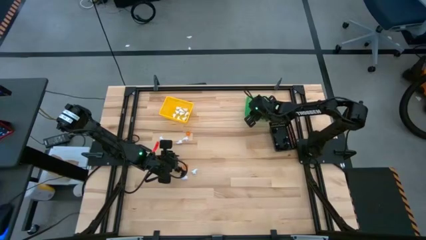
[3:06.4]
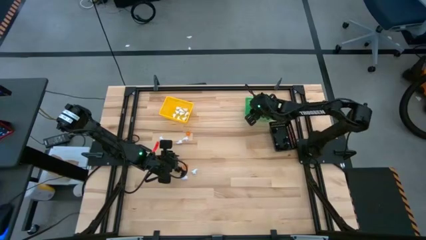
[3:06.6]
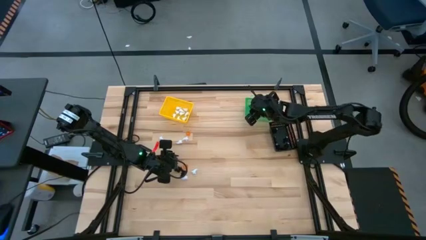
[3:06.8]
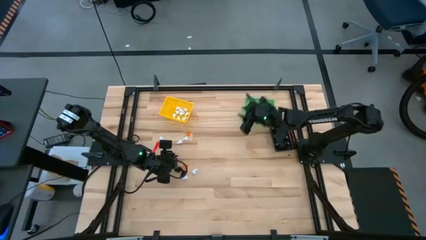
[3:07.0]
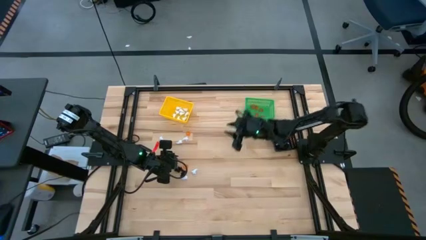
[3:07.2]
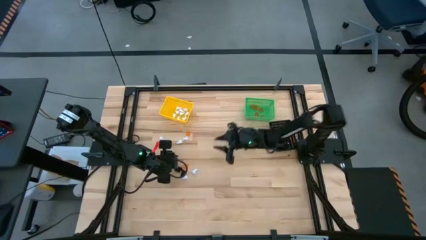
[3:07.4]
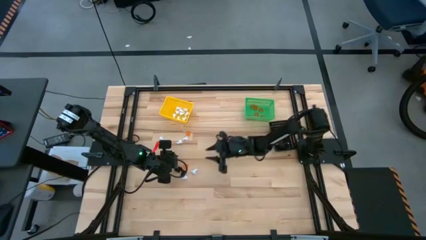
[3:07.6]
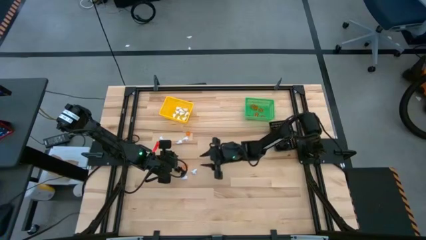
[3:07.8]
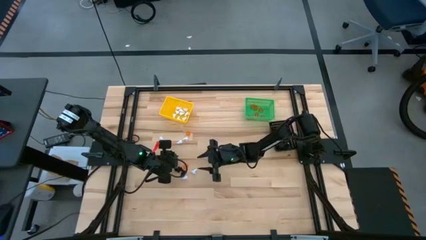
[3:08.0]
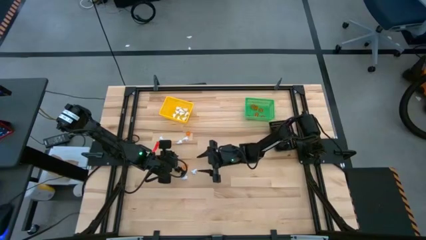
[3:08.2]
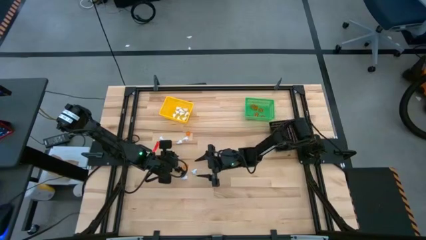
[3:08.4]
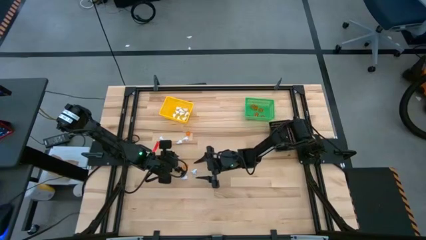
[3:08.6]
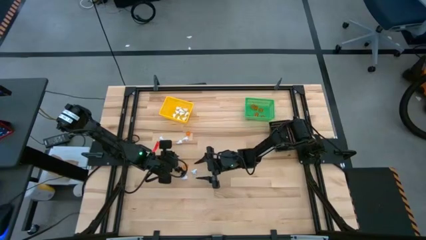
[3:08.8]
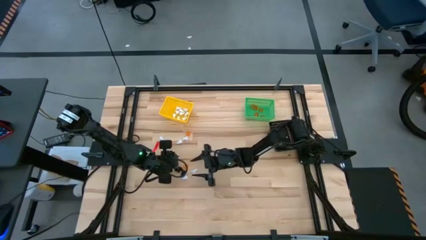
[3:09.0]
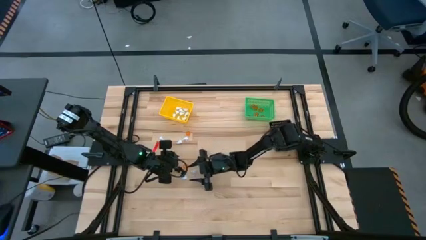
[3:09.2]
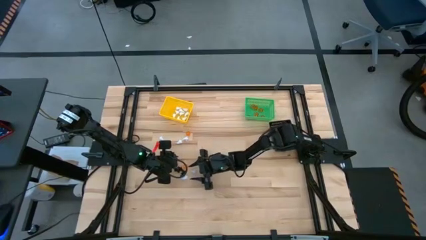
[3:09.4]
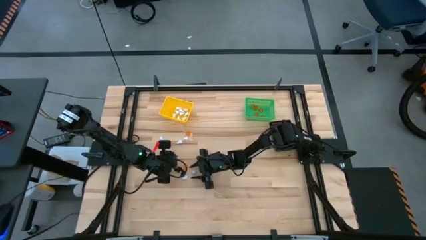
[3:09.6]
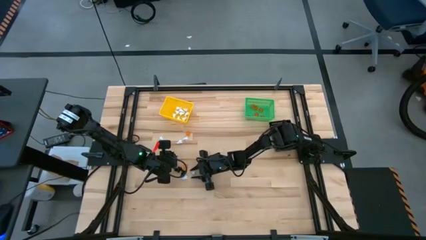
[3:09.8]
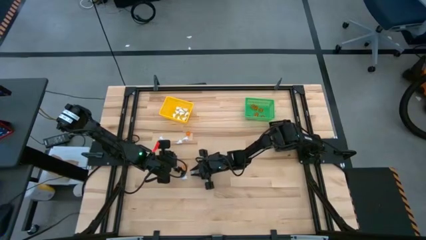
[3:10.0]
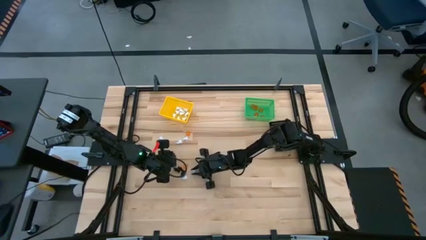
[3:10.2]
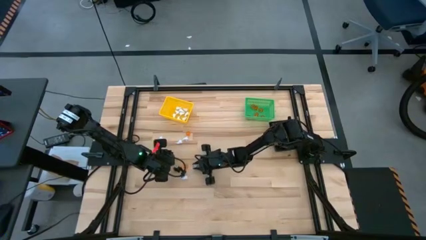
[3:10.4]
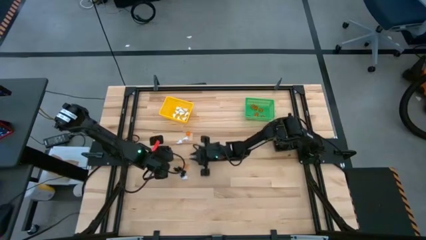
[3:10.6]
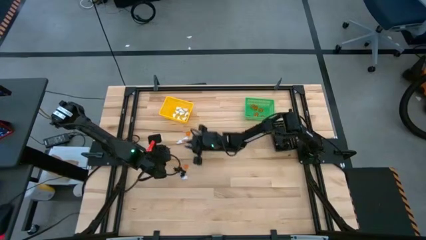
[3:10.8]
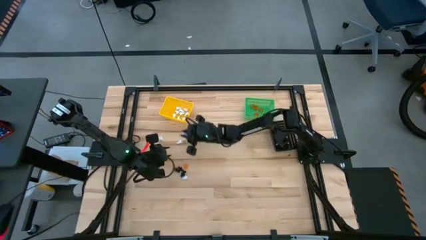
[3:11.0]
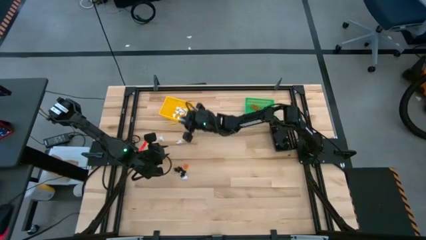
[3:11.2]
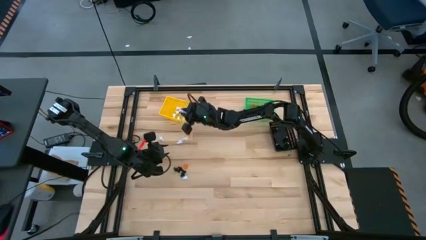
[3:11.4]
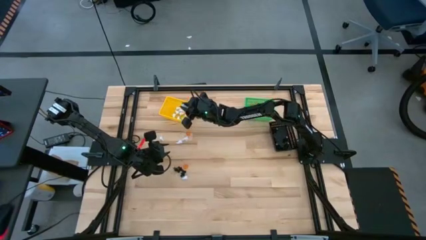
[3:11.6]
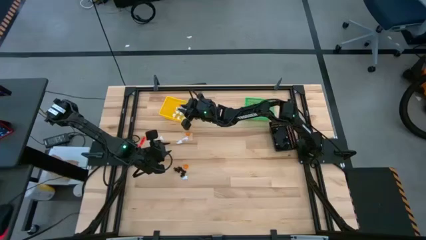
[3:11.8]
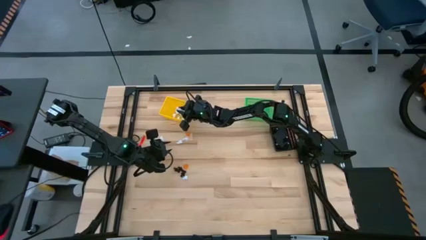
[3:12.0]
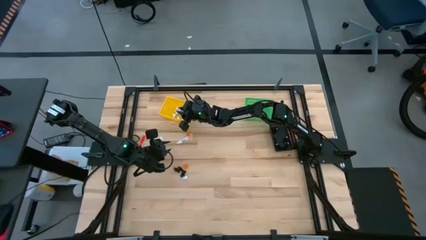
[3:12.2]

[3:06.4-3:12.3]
Task: Sort Halloween decoration
Put the white ghost toy into the yellow bin

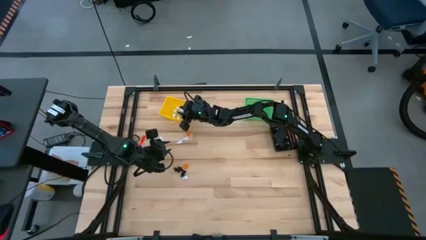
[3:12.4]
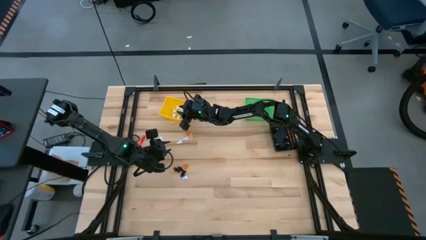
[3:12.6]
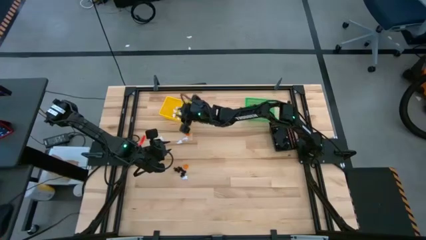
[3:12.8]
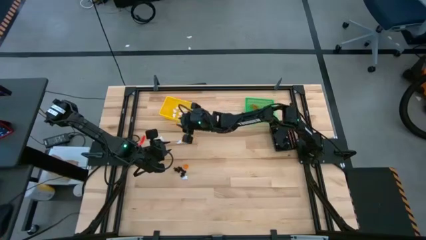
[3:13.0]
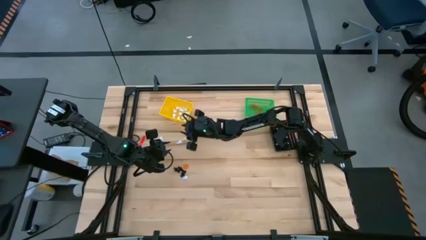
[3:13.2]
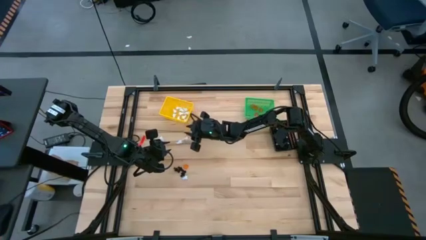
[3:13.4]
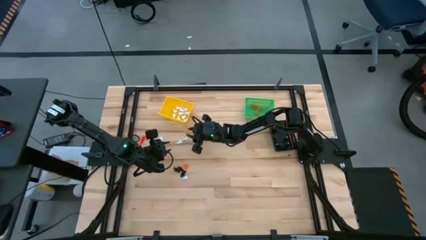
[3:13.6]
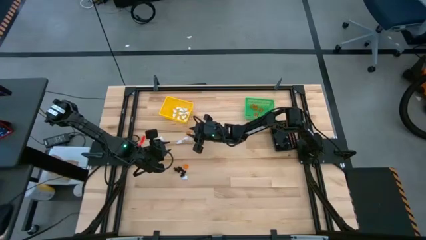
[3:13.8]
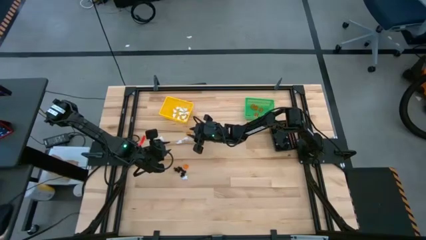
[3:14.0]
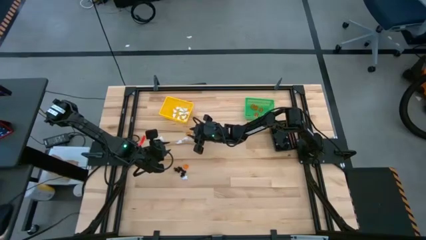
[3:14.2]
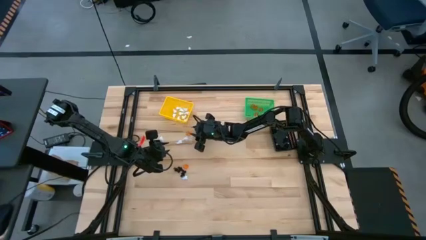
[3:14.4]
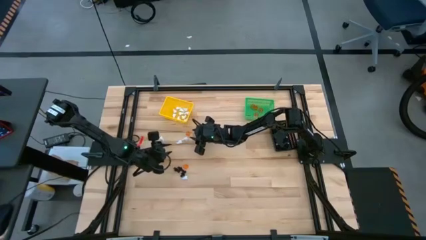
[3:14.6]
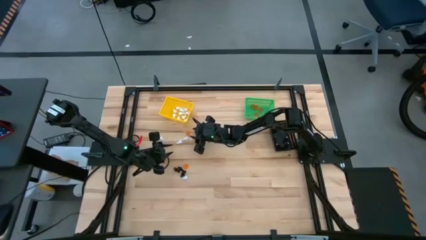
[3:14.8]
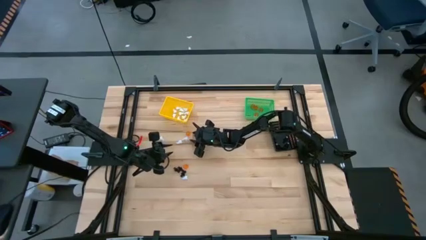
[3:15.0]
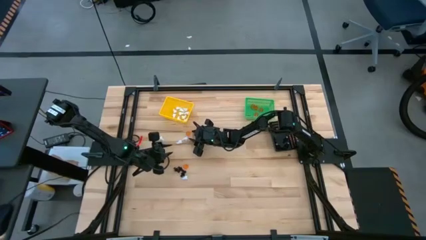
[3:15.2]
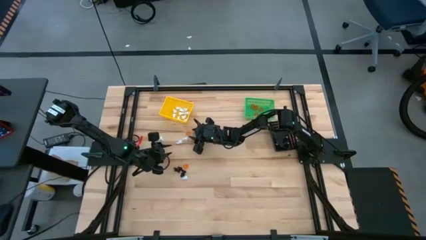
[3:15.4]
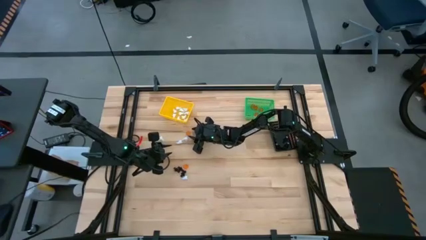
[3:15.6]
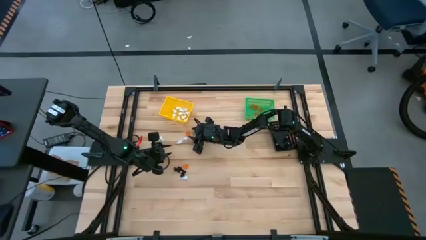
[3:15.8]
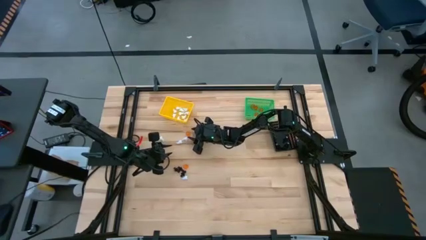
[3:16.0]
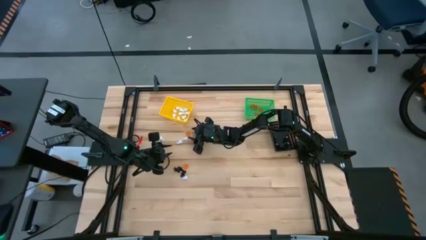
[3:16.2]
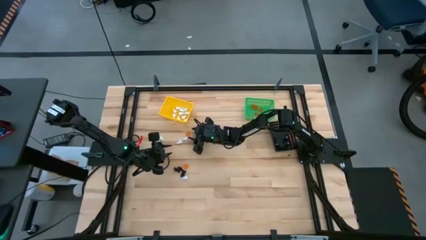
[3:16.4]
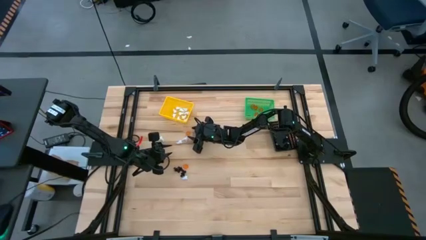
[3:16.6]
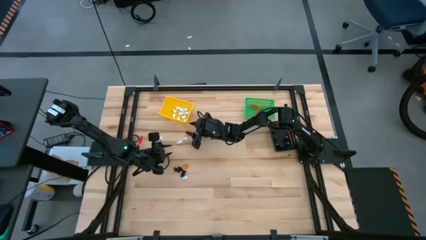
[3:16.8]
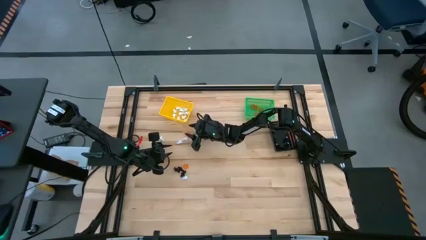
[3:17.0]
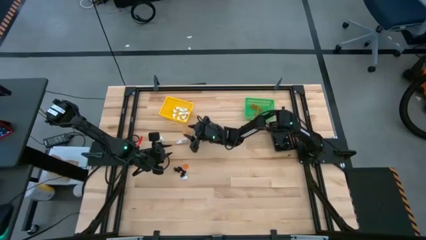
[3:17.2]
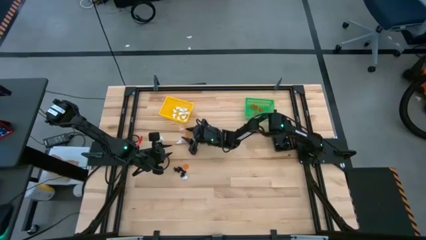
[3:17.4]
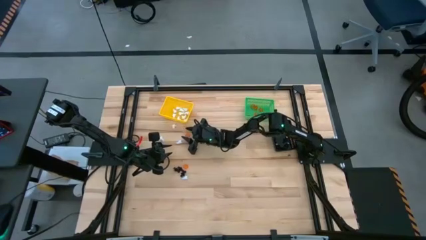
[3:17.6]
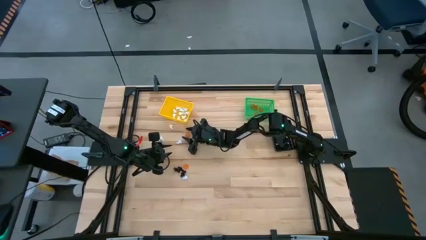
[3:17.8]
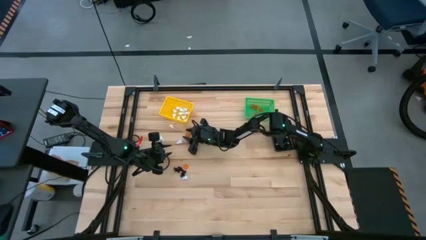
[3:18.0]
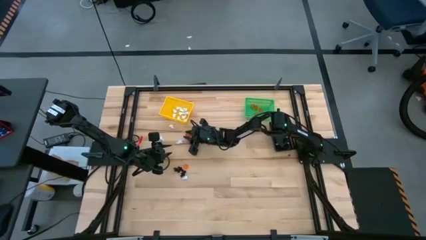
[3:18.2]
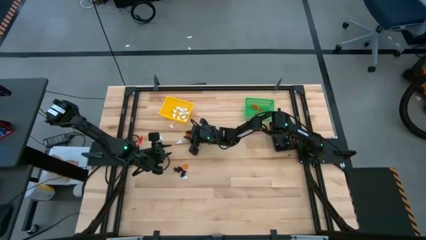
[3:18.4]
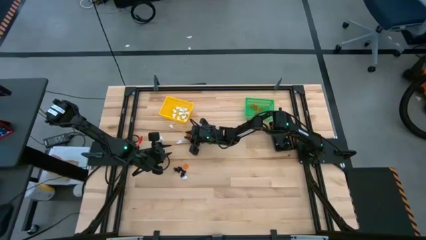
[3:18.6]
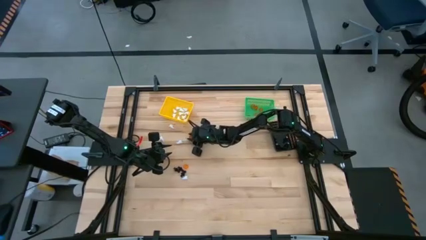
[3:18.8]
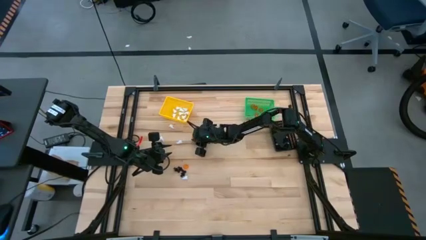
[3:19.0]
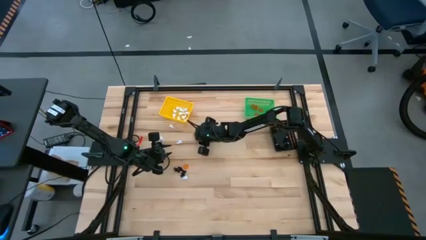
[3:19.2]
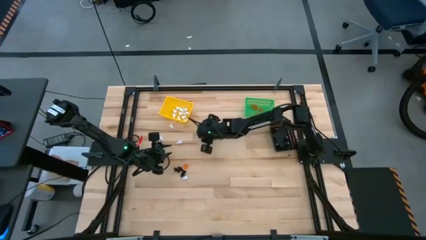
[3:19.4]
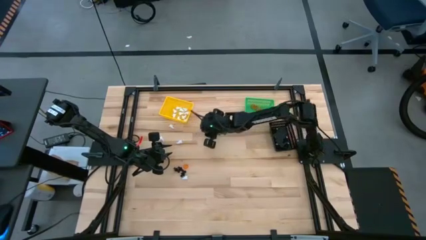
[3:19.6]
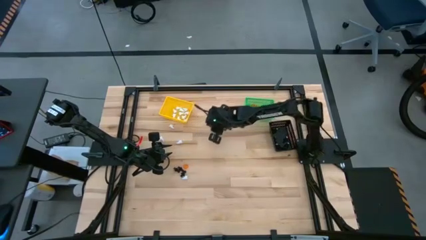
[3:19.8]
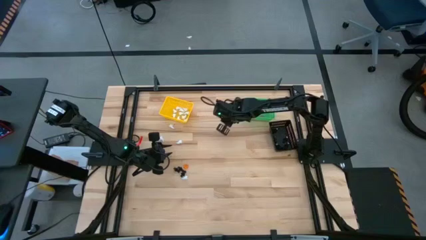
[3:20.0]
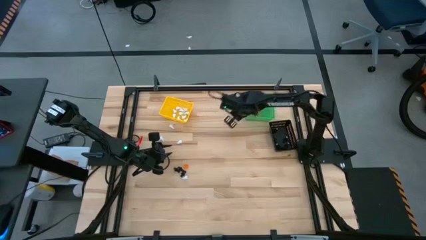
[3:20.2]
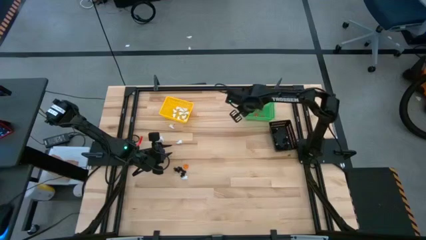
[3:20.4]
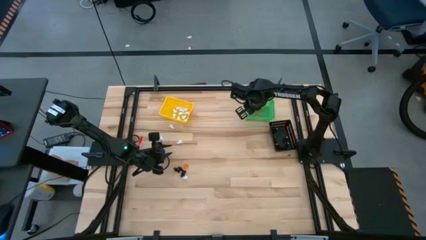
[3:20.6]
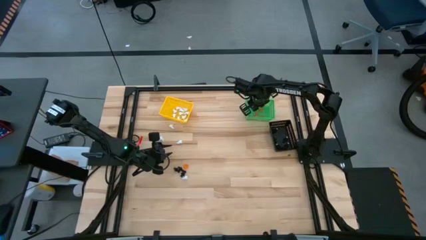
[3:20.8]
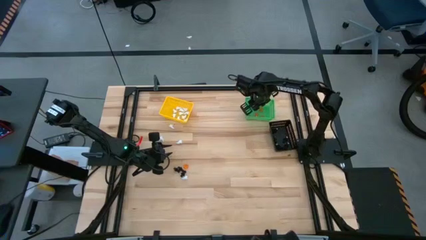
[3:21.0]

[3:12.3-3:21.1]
Put the orange pumpkin toy into the green bin

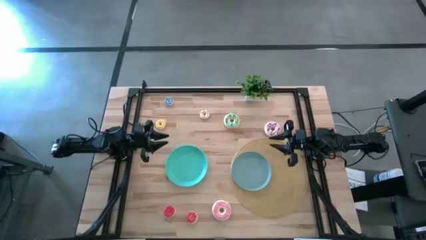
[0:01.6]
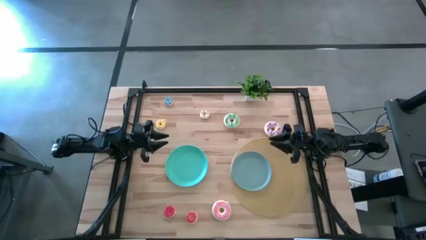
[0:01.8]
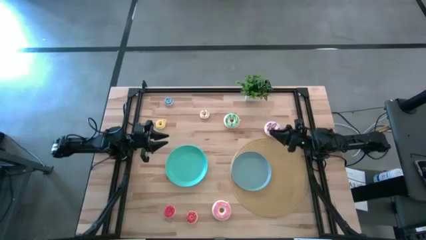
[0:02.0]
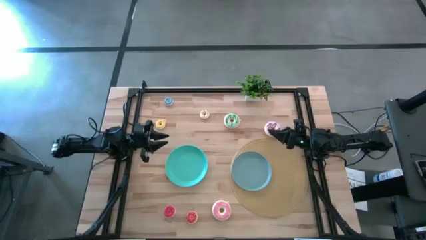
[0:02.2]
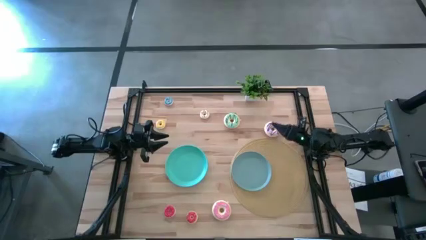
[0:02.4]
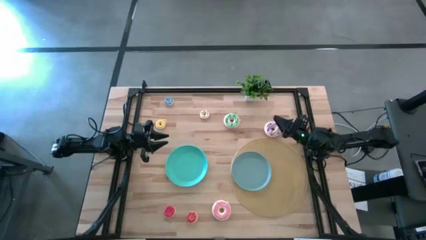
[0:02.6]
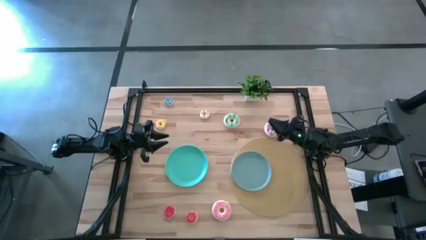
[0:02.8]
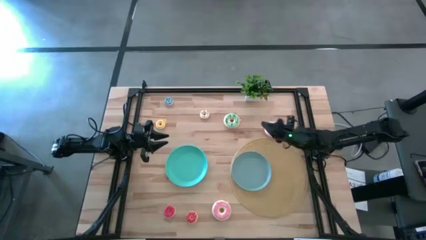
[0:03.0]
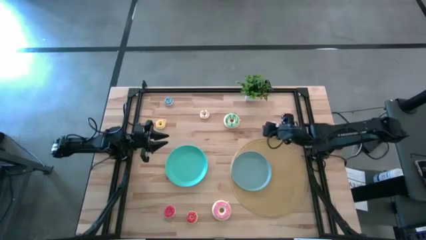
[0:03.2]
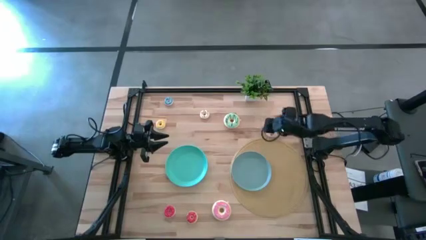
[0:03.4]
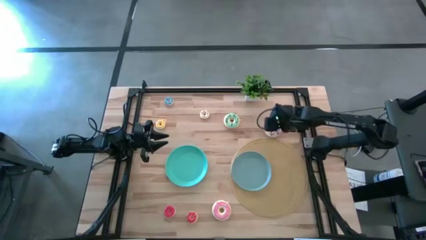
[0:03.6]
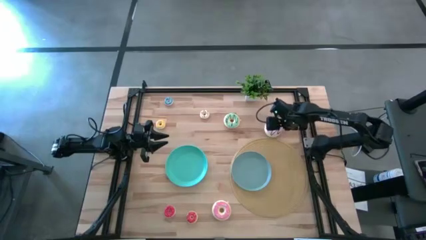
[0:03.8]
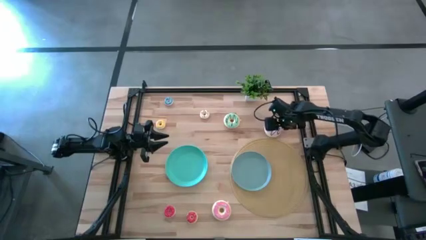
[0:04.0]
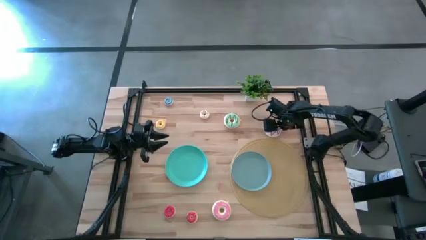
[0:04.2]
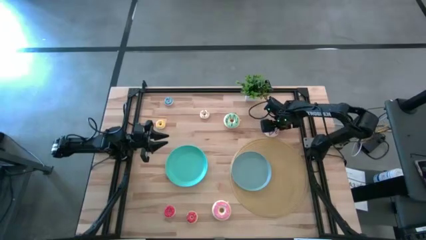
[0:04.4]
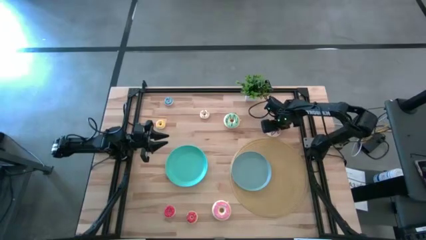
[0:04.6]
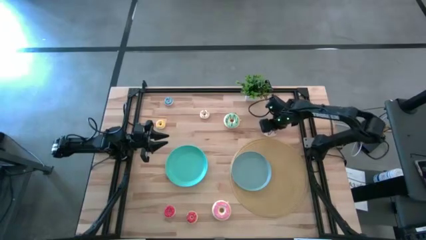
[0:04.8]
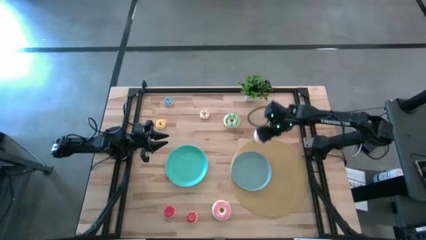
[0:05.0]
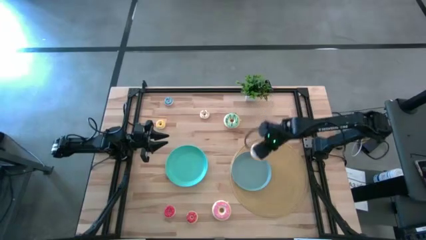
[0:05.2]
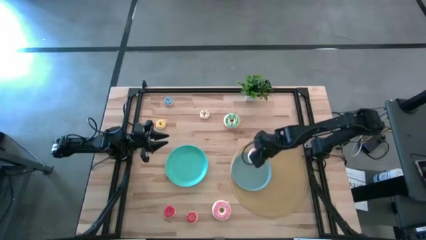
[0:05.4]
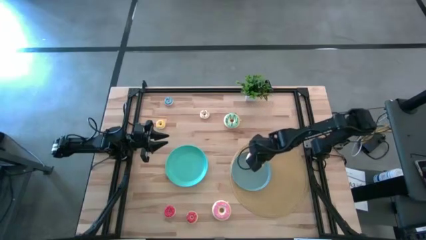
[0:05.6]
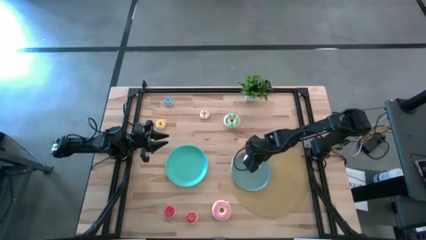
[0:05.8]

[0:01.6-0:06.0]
Task: Pick & Place donuts
Put the large purple donut on the gray plate
